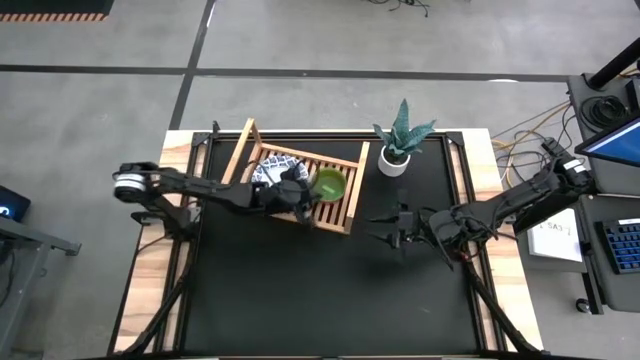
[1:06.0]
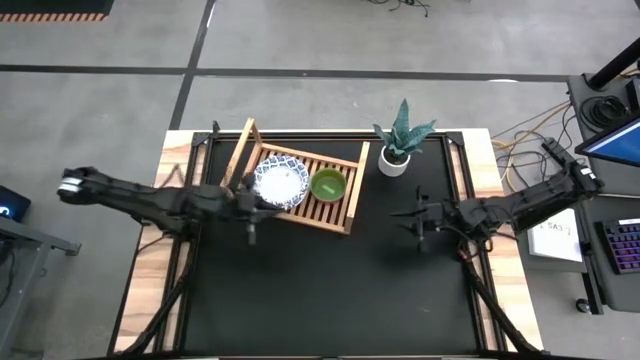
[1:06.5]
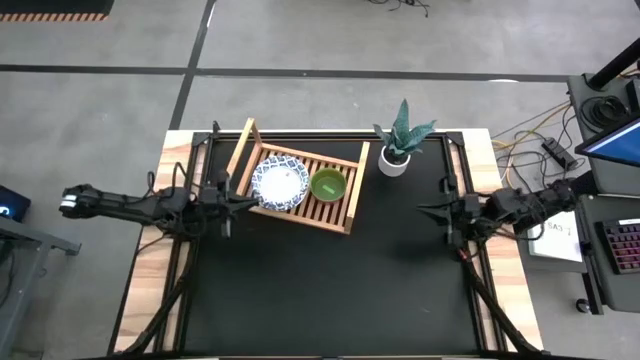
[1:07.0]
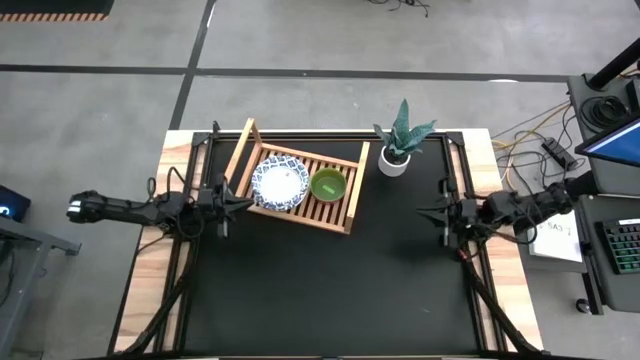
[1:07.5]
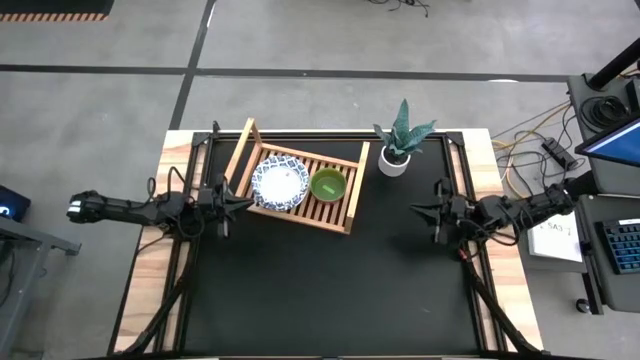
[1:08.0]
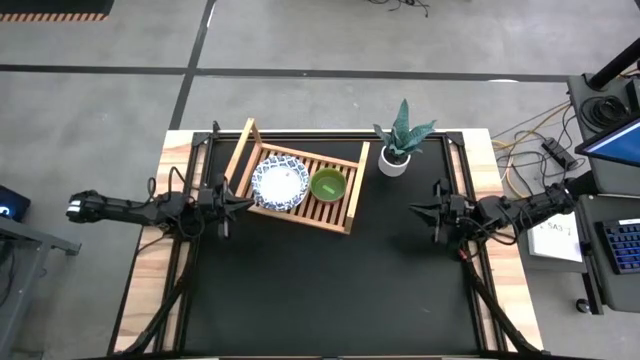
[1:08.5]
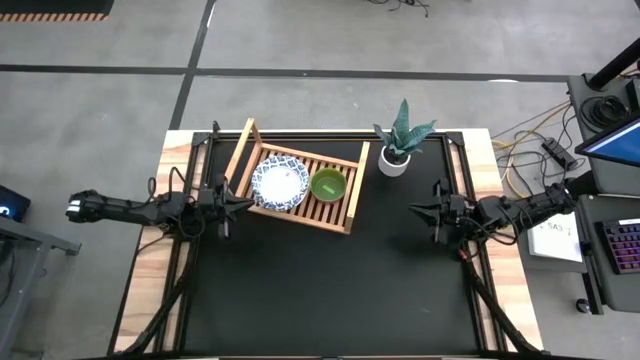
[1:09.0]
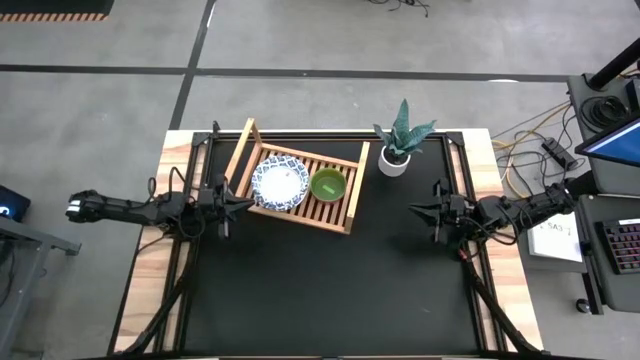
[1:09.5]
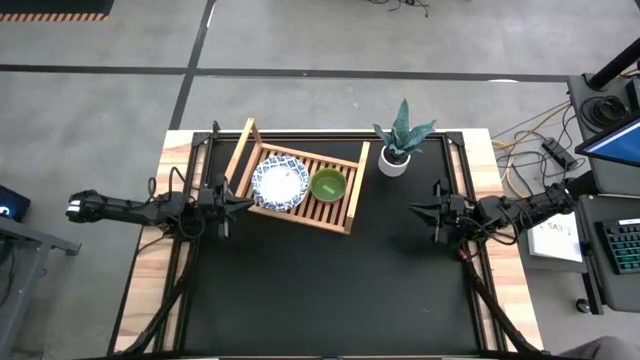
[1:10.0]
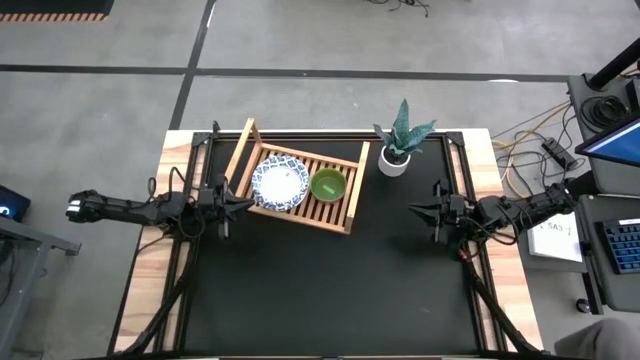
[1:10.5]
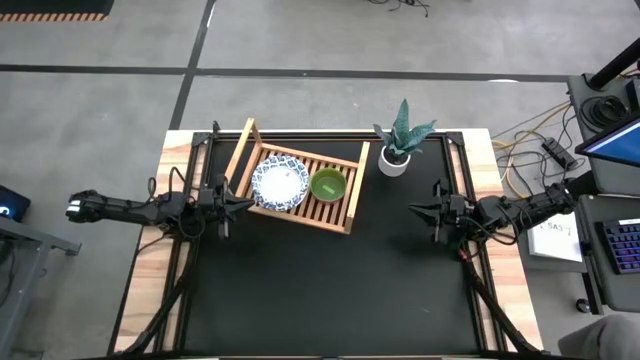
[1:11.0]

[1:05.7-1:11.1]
Task: Place and stack bowls onto a shelf
Return to Home Position

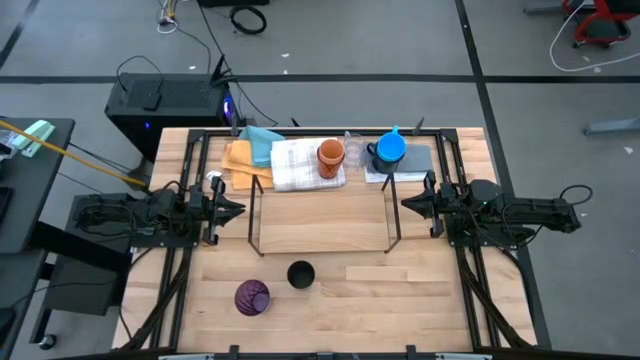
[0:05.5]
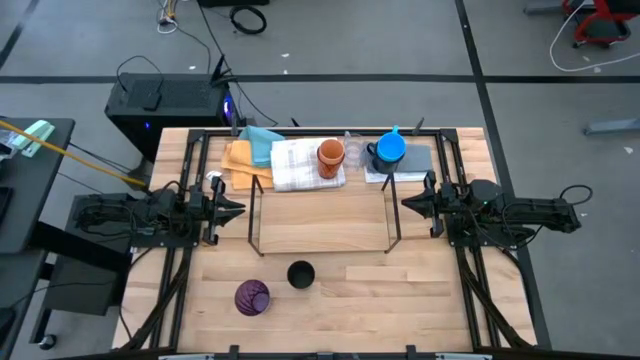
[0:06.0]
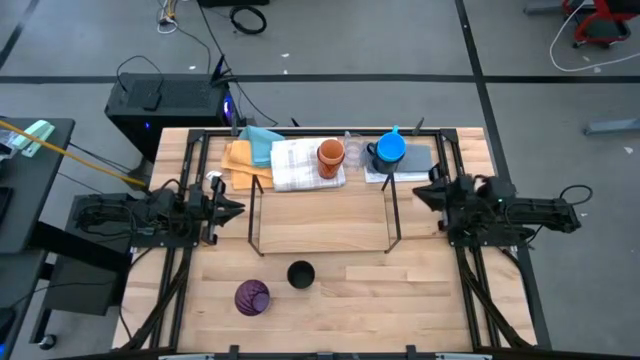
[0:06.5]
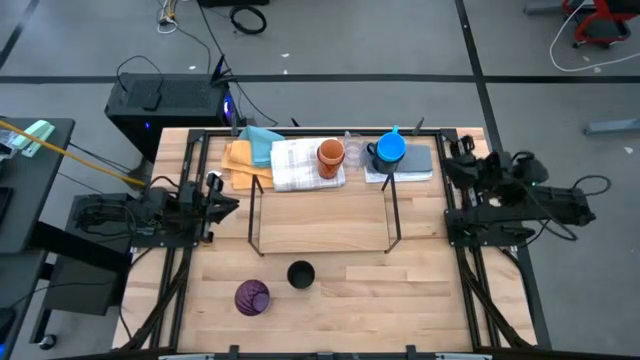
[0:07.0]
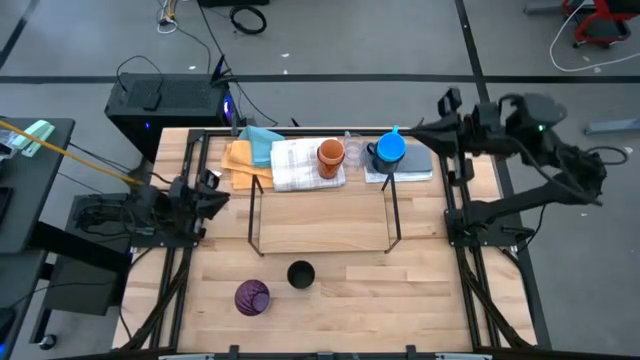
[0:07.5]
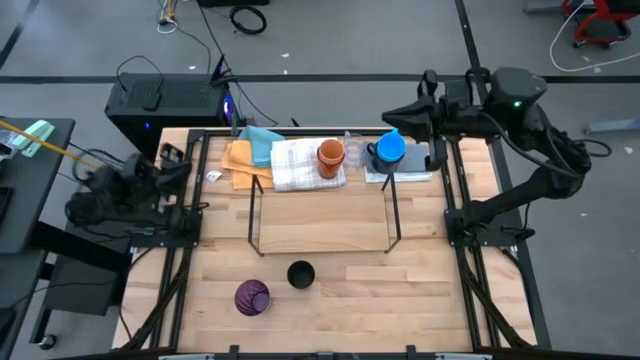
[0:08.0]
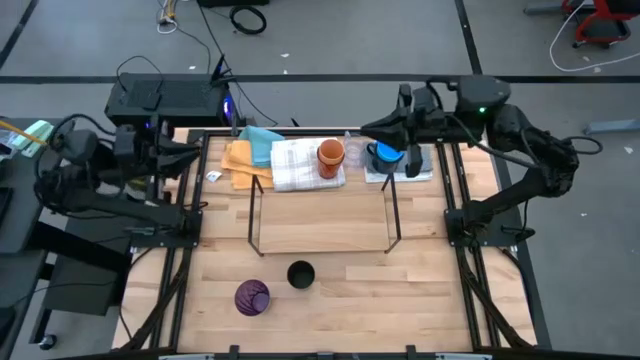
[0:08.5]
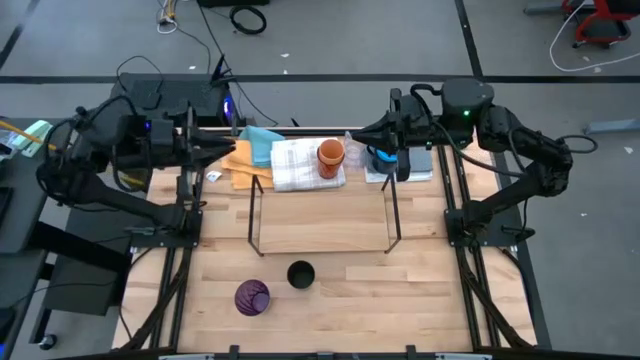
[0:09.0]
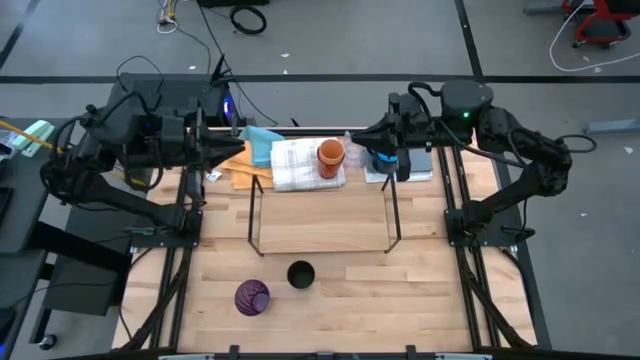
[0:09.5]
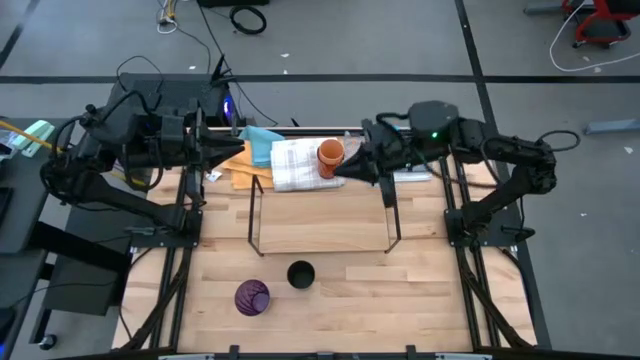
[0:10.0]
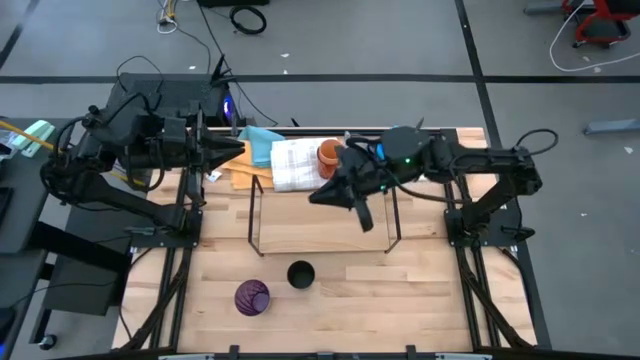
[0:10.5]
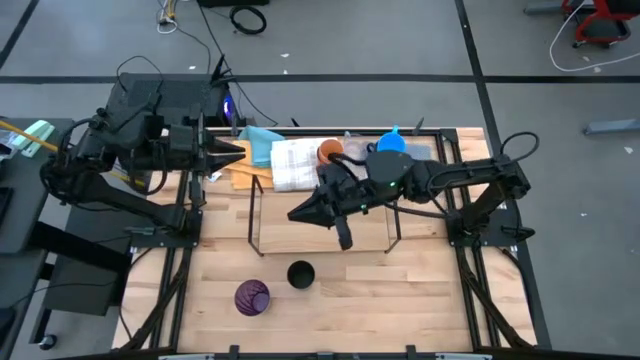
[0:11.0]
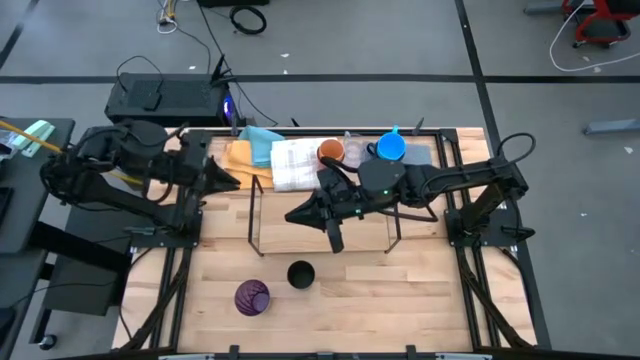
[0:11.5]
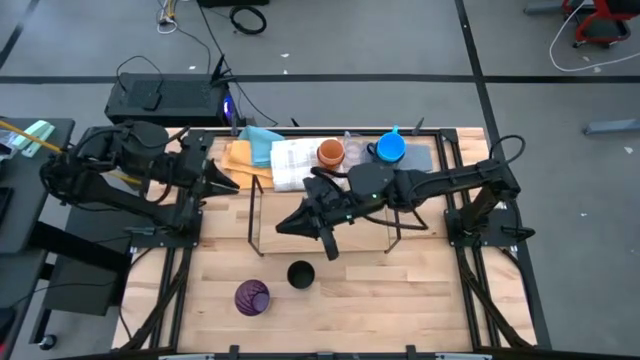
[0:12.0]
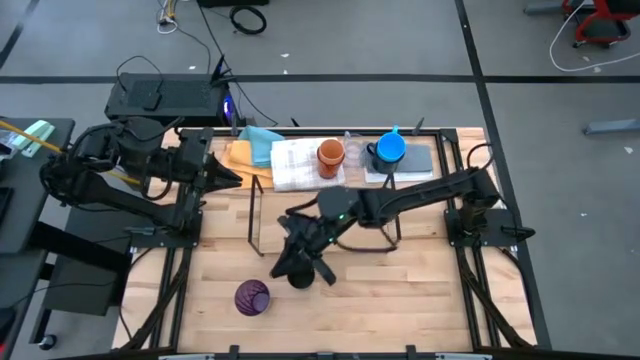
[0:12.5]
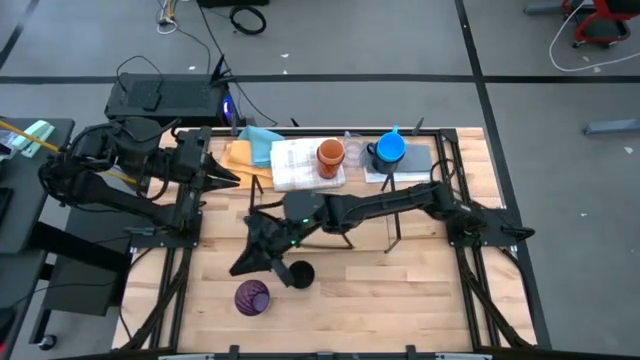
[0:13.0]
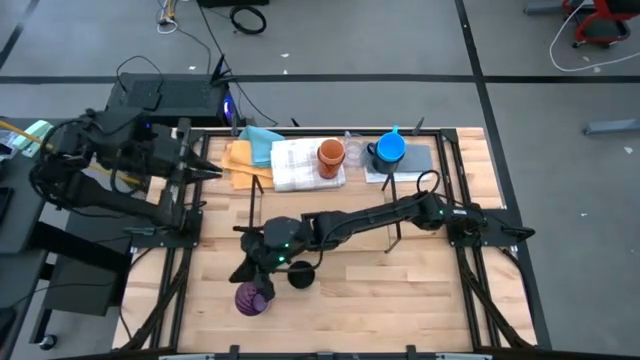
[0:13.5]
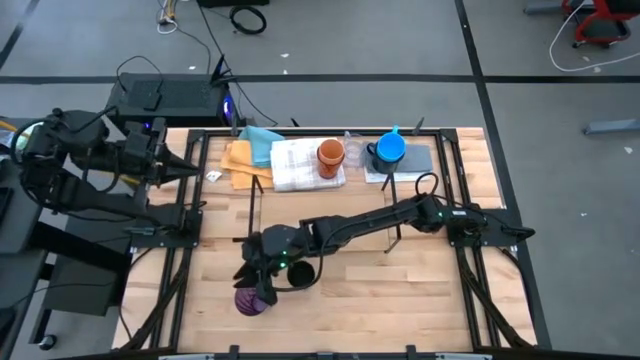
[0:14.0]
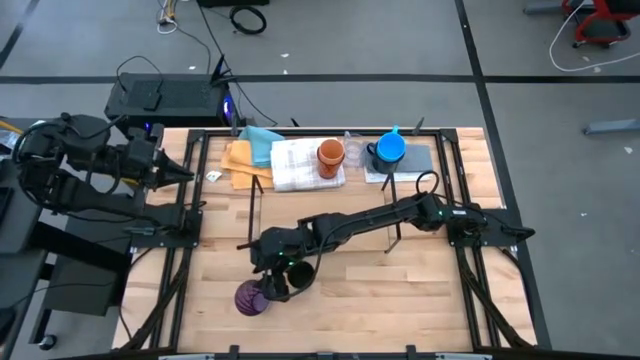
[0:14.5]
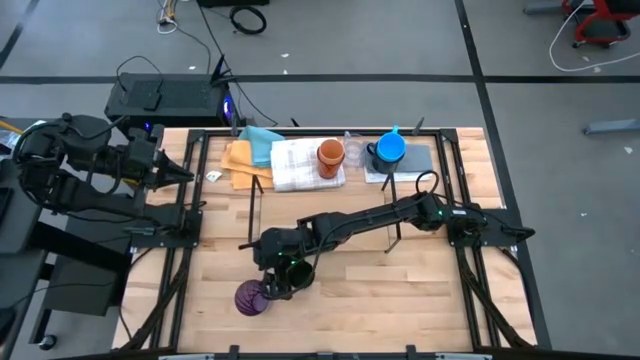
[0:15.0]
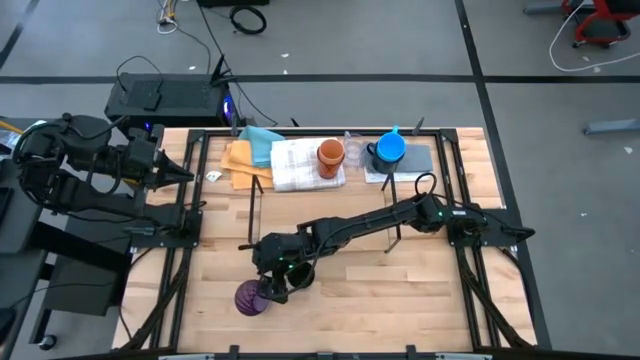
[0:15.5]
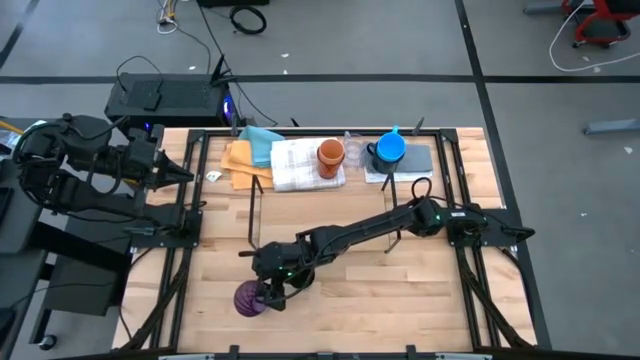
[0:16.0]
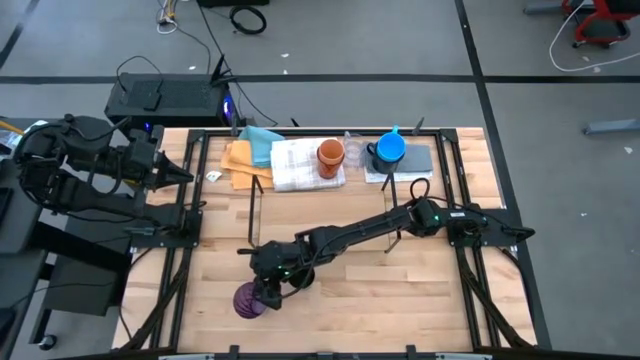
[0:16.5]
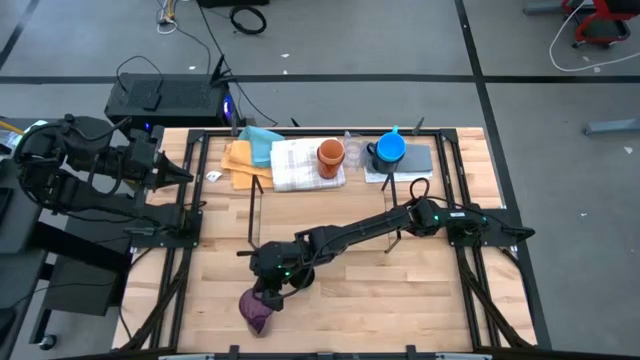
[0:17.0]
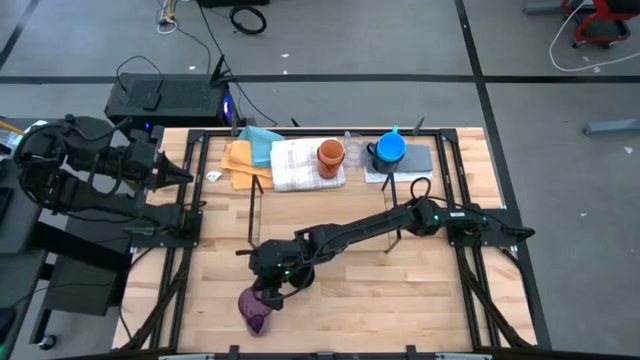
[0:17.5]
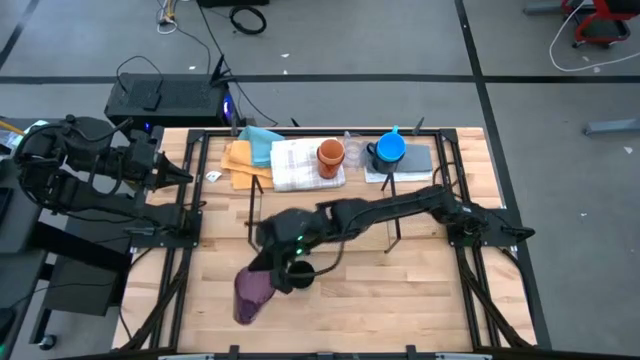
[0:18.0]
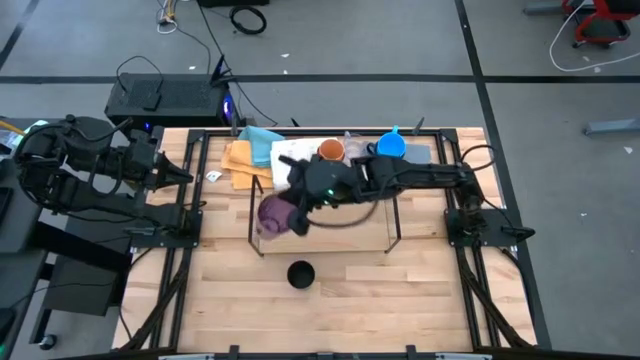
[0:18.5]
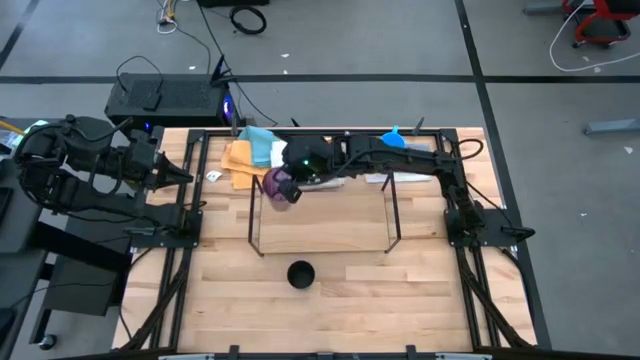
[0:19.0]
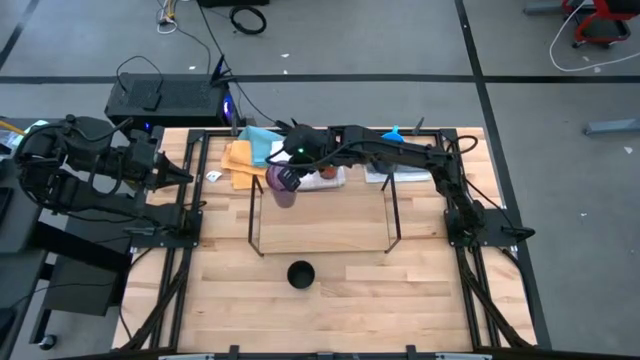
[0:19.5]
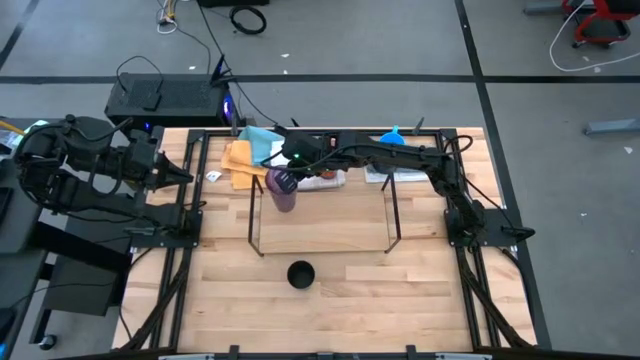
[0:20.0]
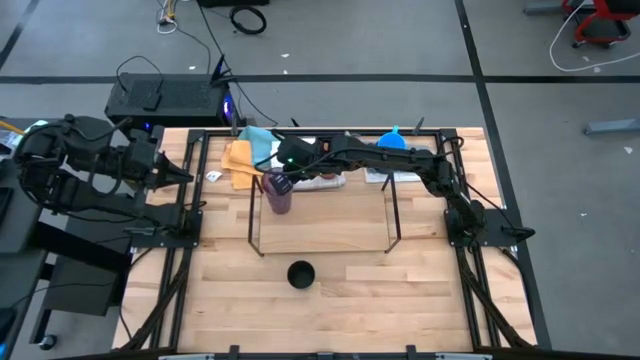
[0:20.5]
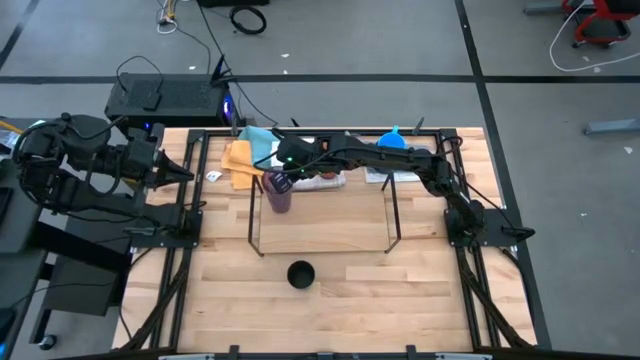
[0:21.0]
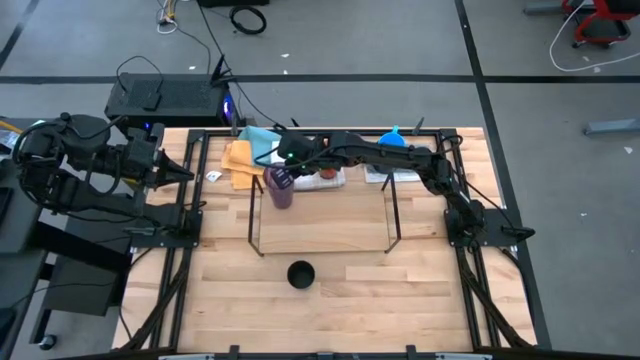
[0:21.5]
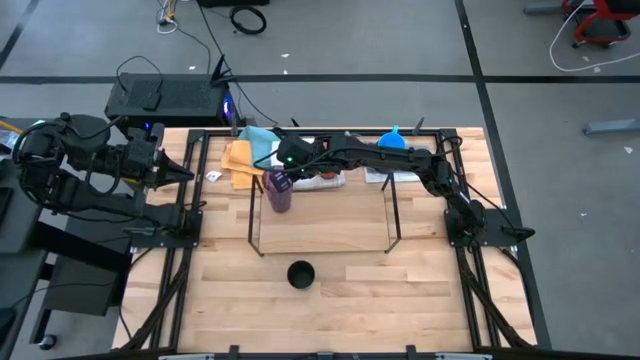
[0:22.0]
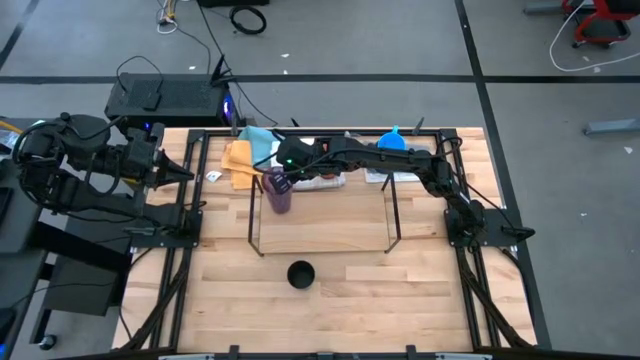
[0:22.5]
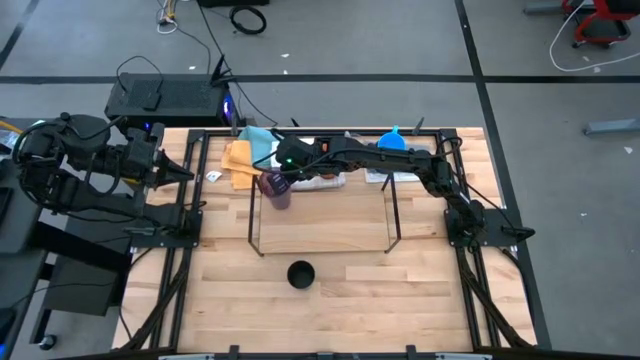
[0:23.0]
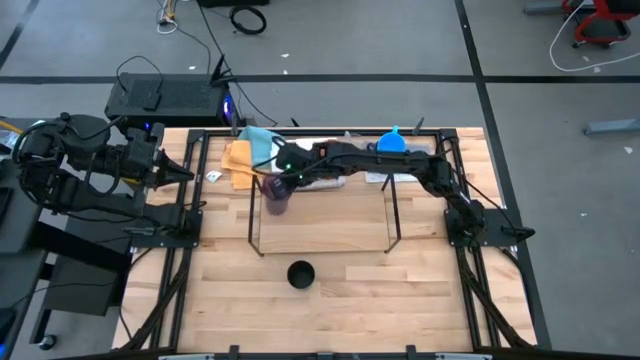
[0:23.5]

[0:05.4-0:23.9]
Task: Stack small to large cups/mugs on shelf
Put the purple glass on the shelf
